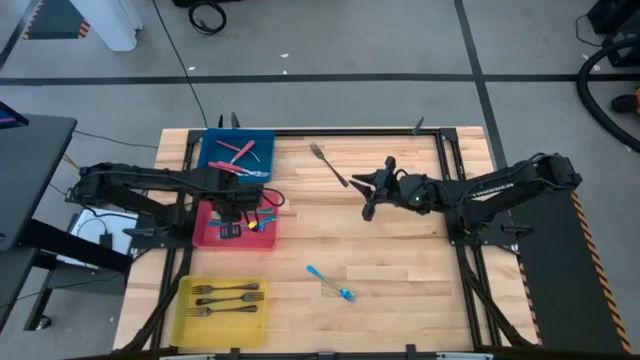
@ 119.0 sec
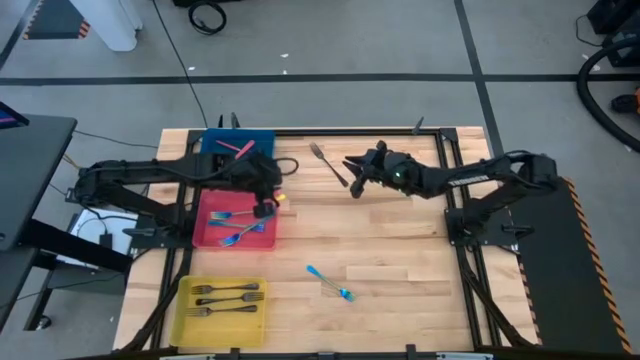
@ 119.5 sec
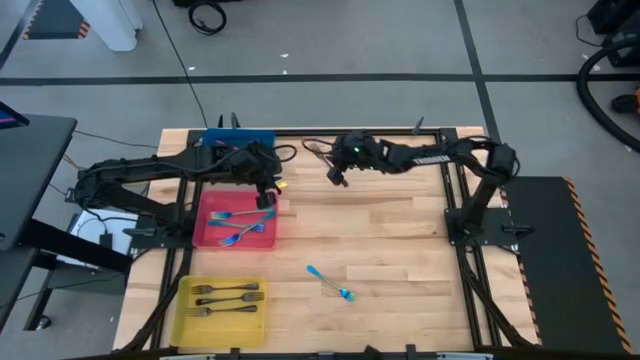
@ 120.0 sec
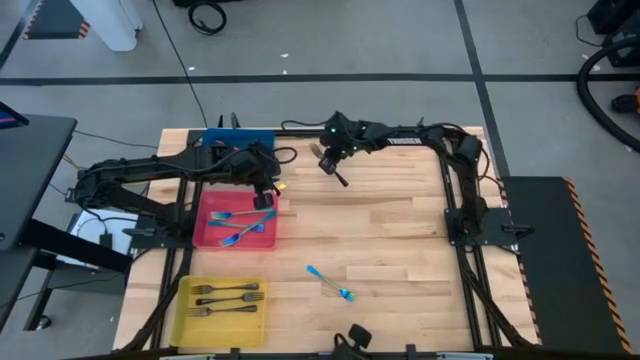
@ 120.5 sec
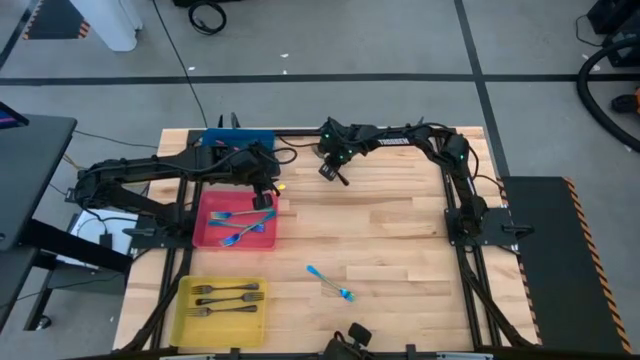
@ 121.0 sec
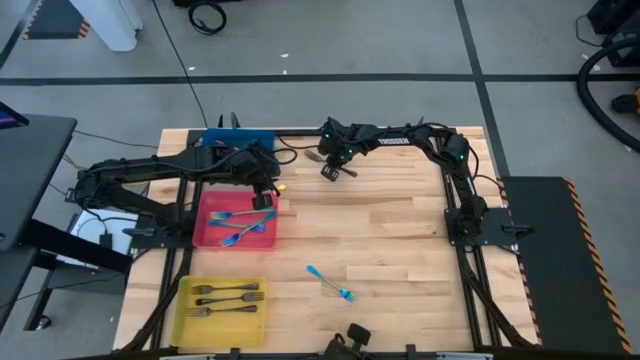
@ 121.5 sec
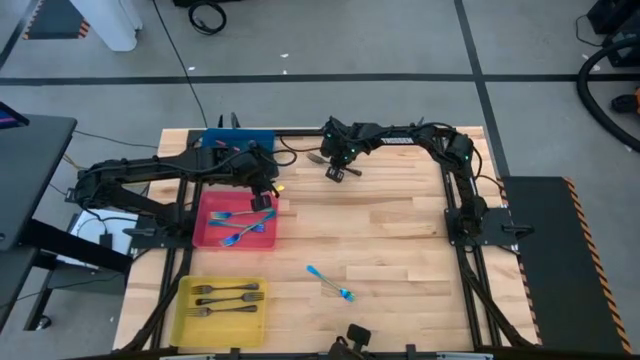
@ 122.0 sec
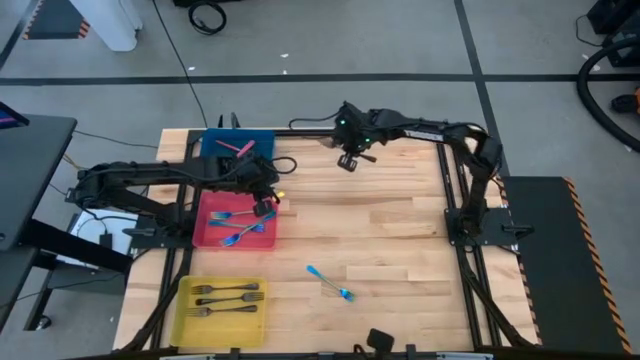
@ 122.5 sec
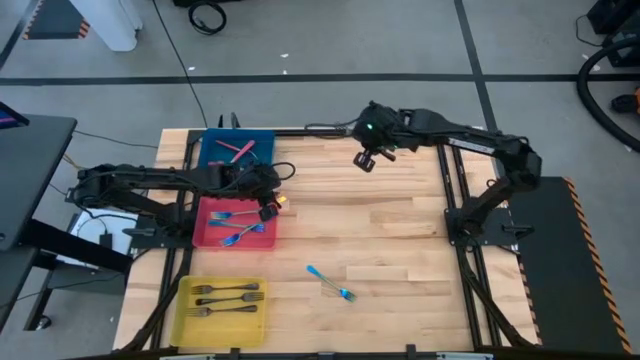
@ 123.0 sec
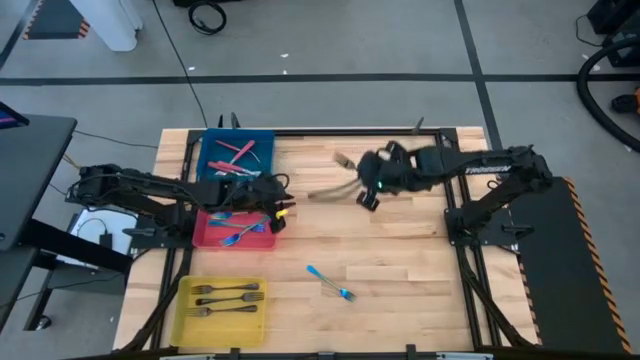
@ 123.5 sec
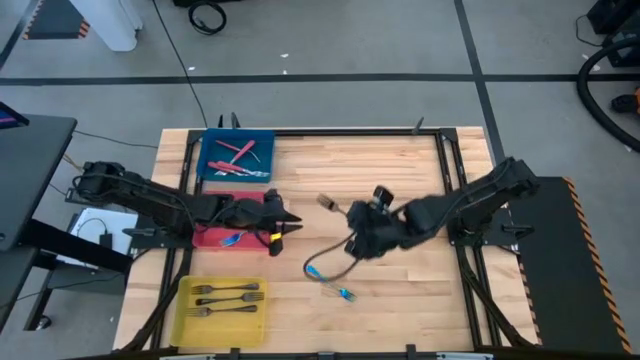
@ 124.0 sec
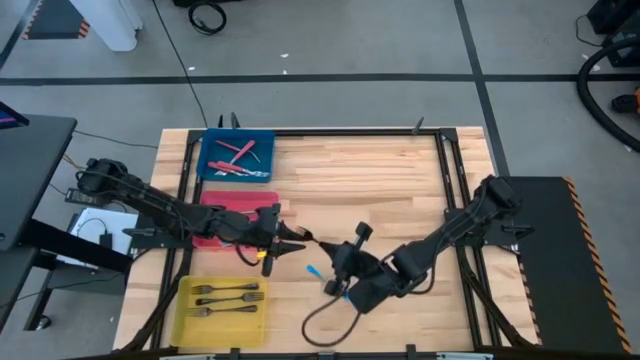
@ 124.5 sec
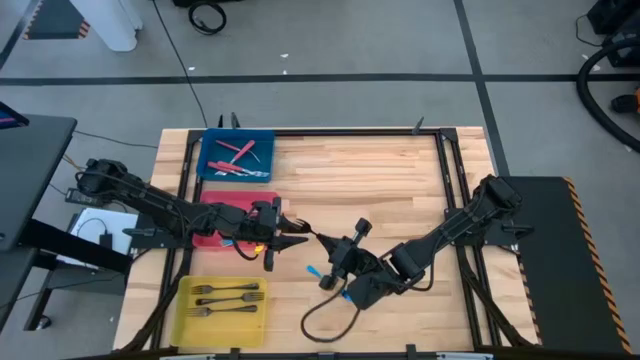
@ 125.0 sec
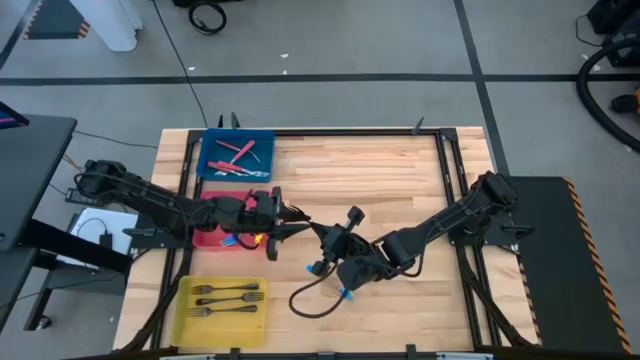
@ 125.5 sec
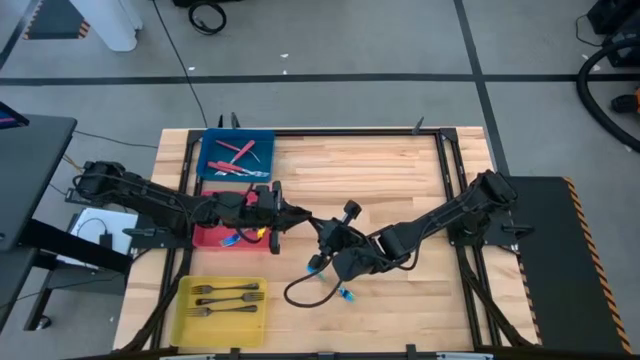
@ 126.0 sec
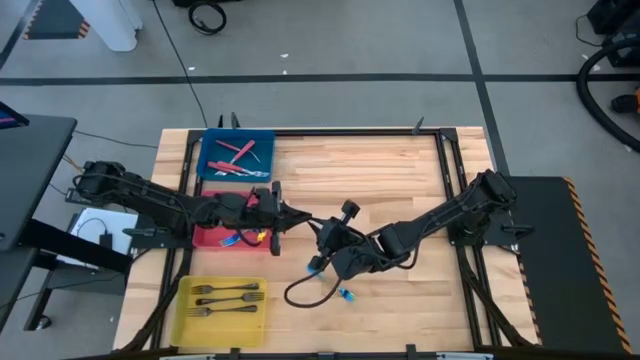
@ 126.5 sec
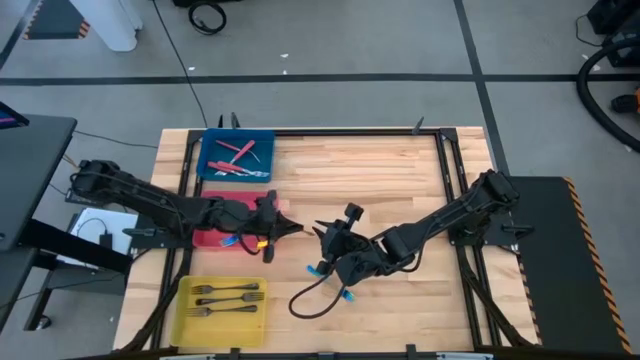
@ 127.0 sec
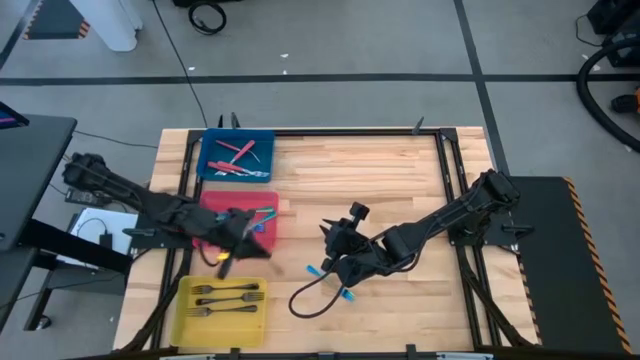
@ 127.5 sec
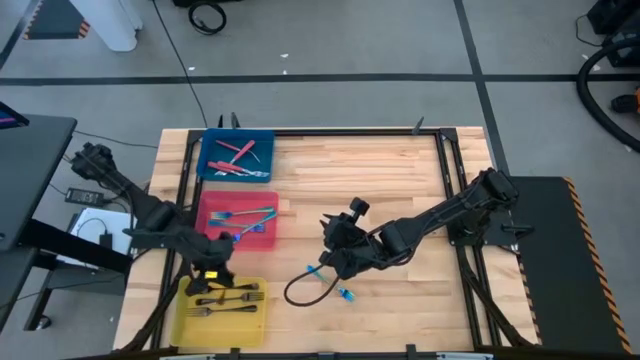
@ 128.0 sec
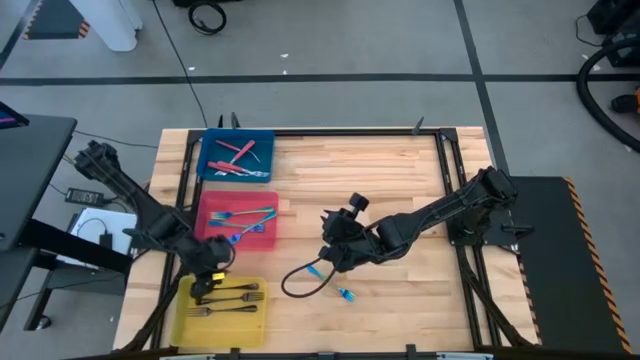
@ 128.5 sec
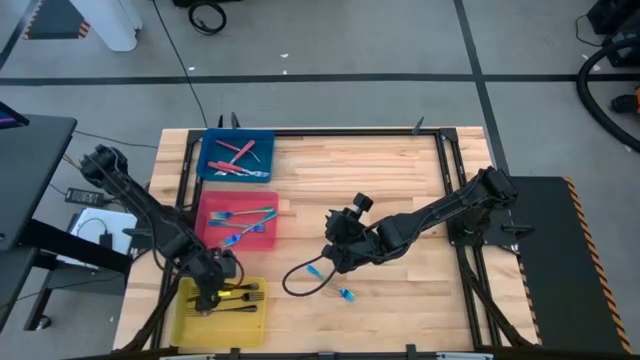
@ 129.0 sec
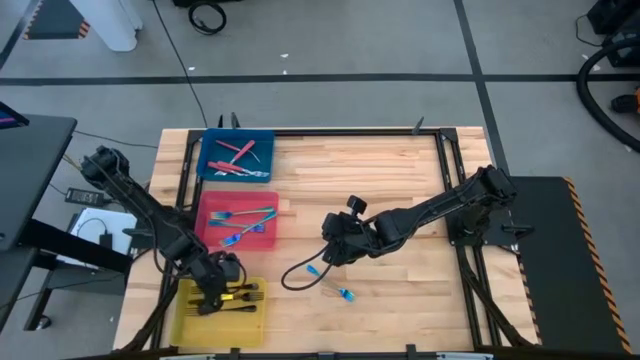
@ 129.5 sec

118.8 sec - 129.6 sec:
Task: Sort silverware by color (type)
Put the black fork into the yellow bin

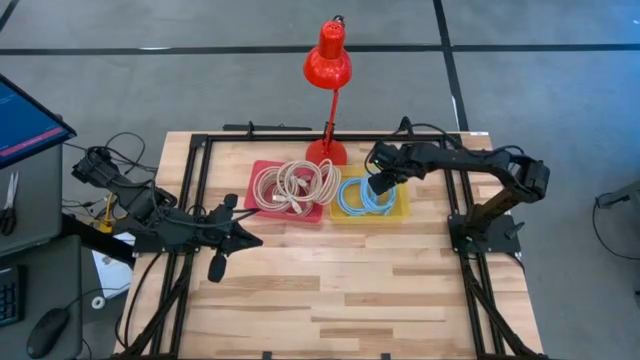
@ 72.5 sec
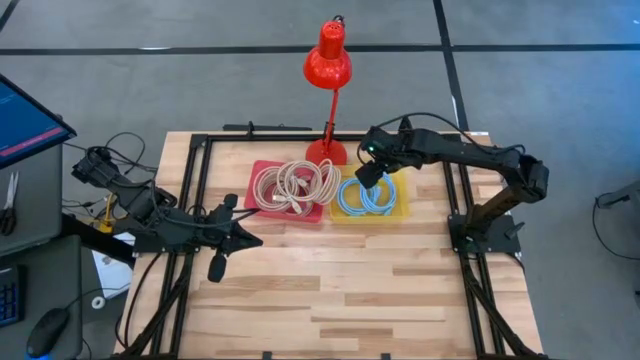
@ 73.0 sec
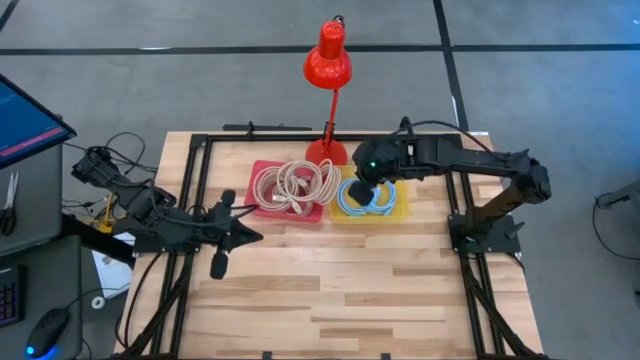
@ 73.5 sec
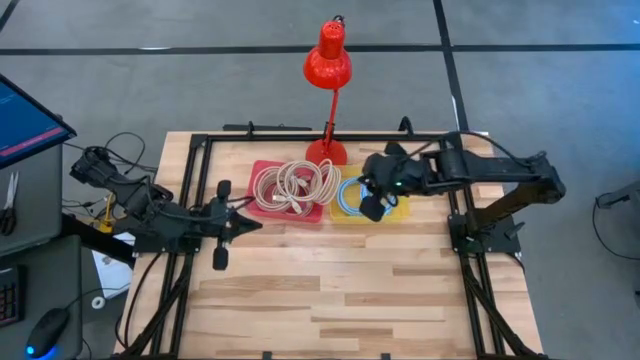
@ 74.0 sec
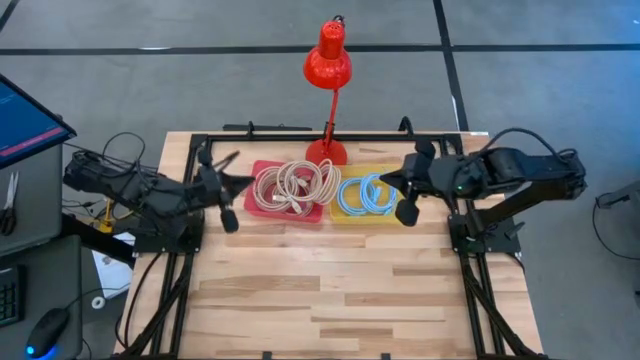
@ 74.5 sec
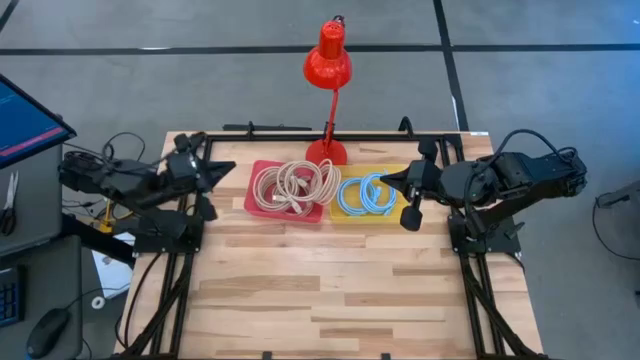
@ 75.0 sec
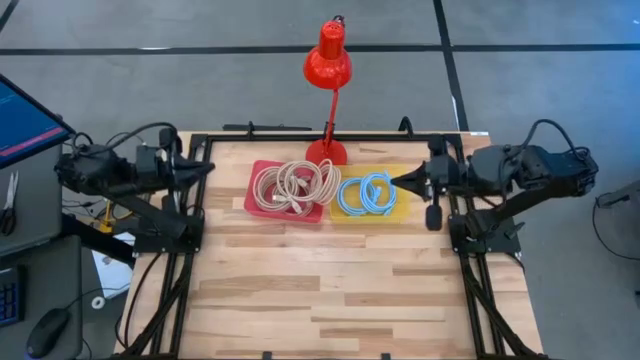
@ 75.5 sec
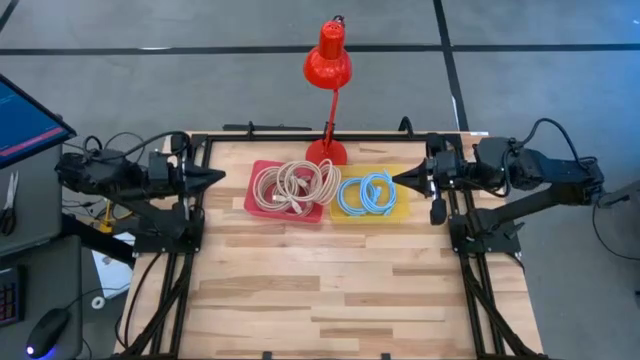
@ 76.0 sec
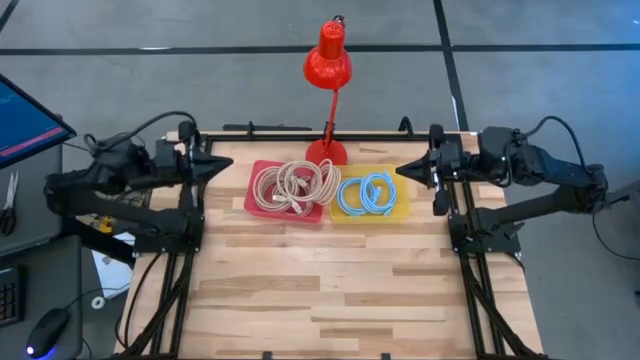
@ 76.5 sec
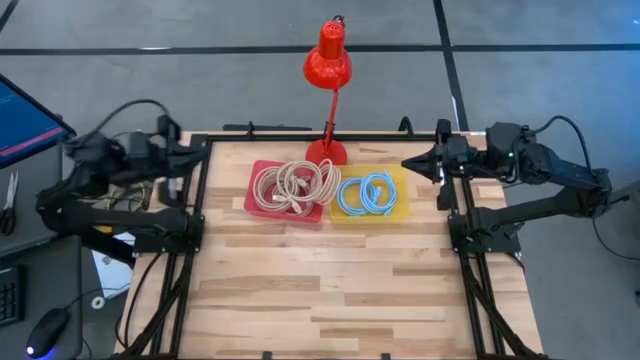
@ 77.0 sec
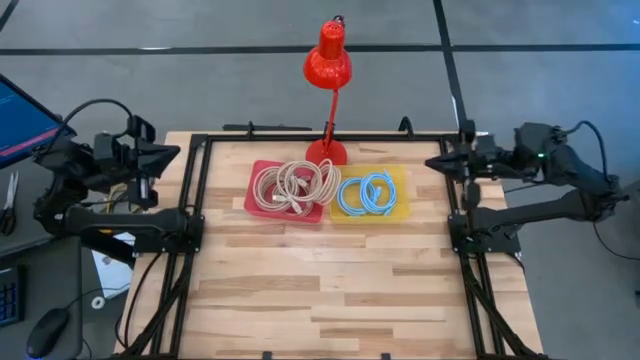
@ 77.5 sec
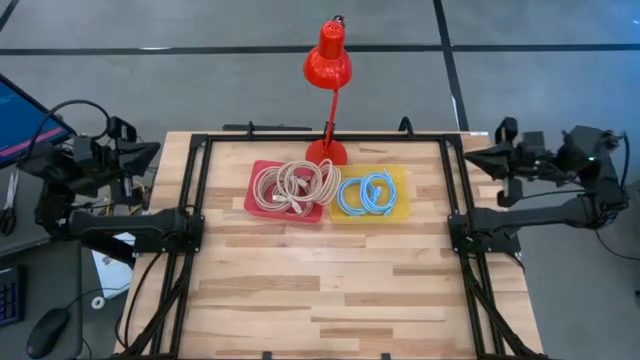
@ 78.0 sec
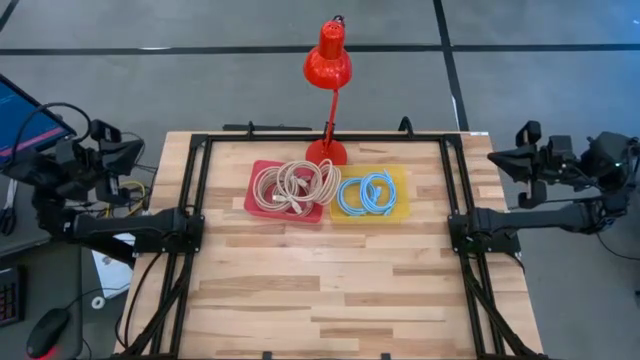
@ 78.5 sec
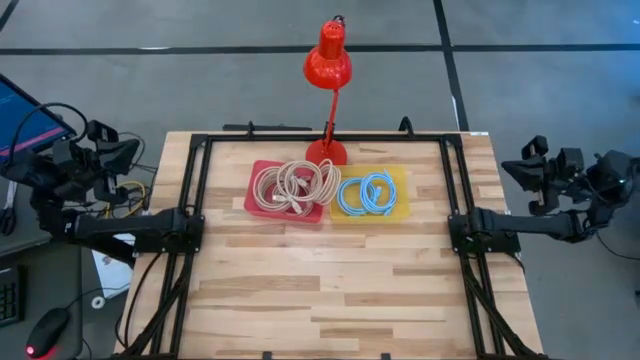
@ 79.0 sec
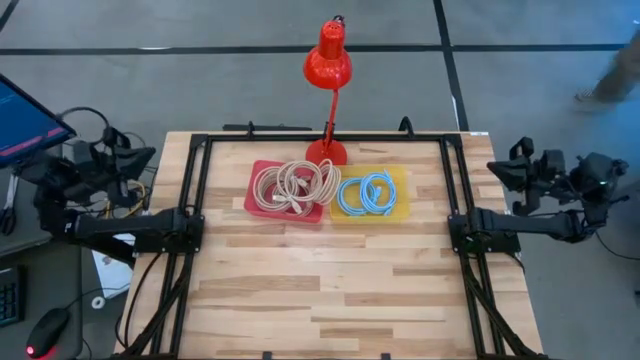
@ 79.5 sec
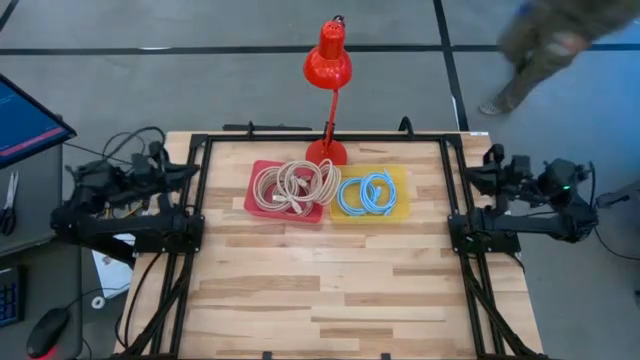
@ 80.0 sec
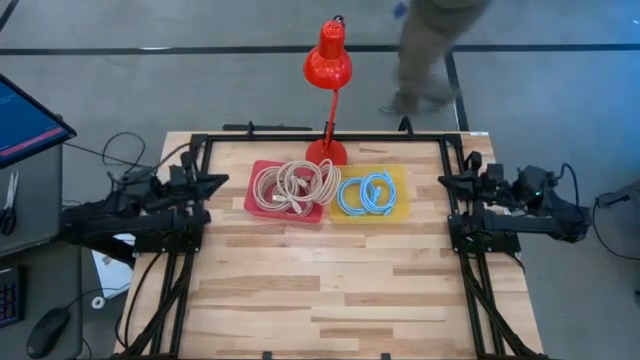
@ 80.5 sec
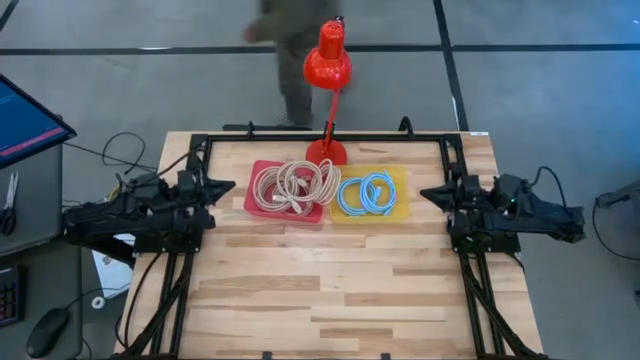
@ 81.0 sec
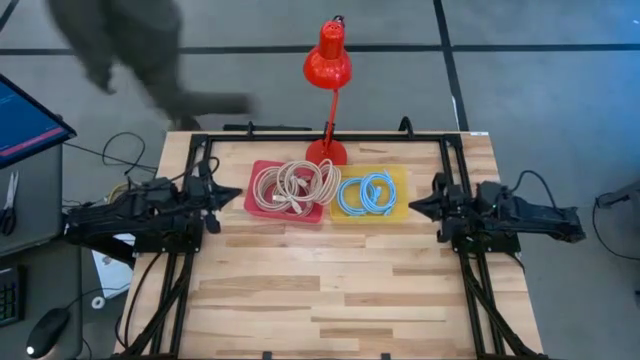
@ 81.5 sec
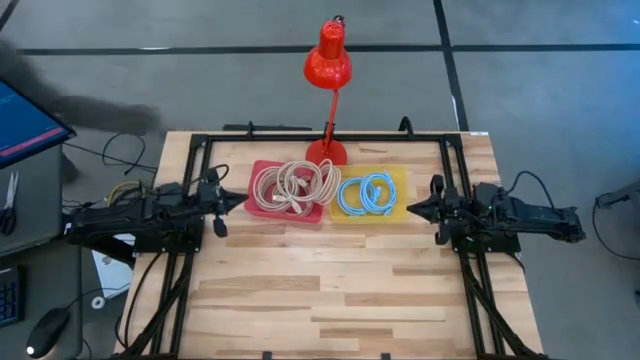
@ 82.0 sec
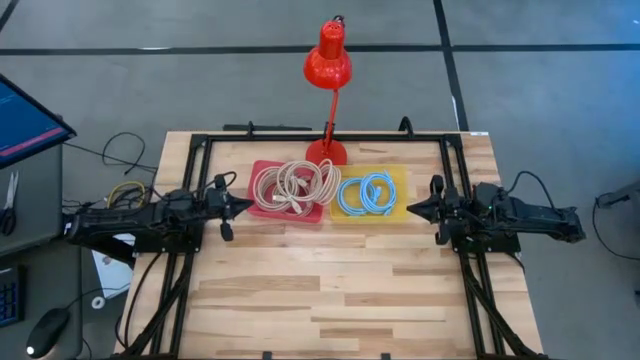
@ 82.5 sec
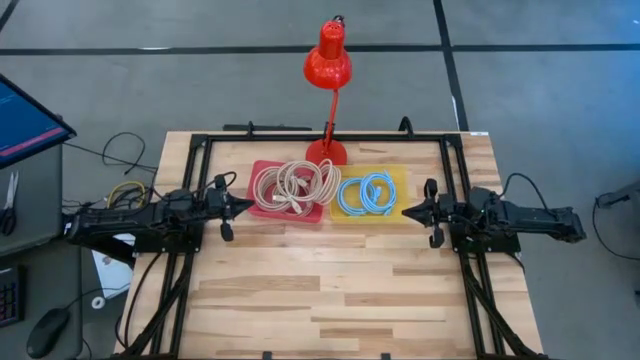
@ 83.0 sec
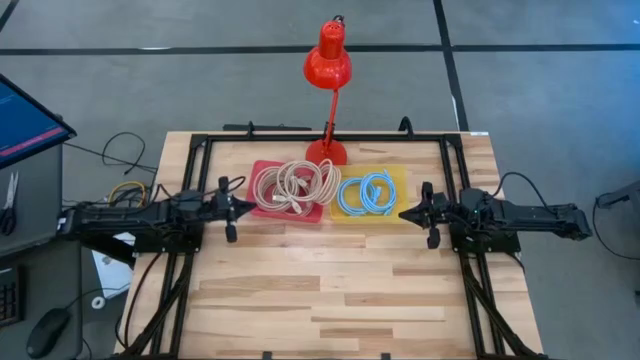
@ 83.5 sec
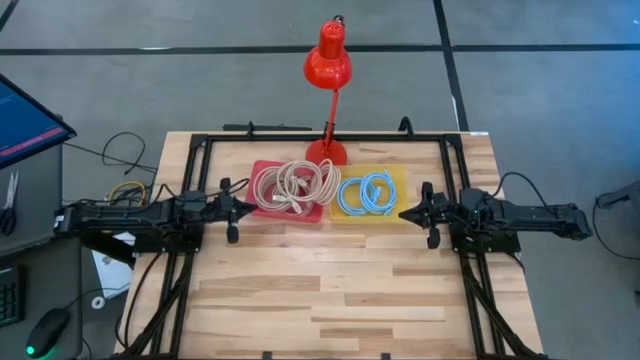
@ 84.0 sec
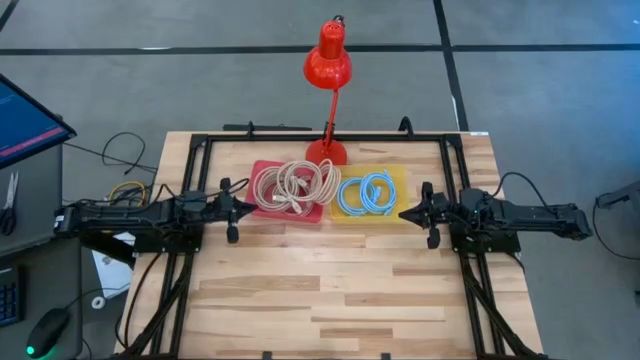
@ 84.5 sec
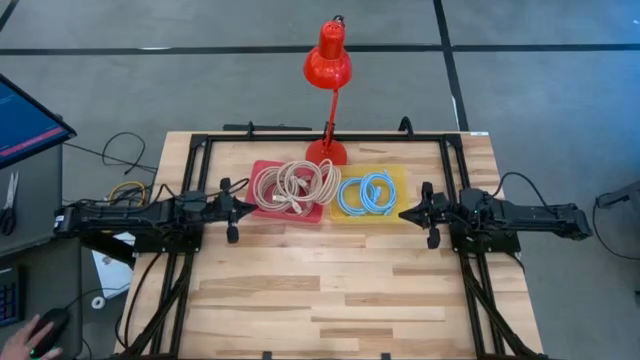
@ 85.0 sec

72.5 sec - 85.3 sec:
Task: Sort HDMI cables
Return to Home Position
